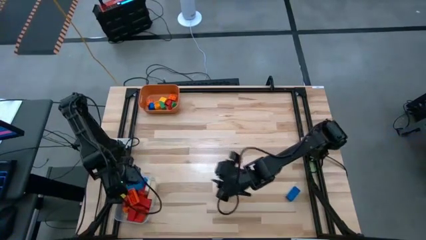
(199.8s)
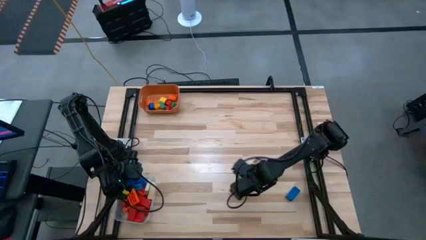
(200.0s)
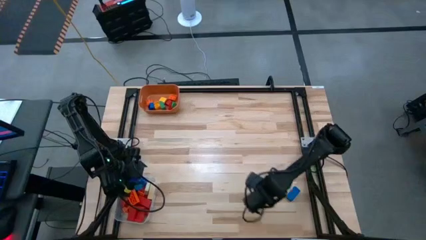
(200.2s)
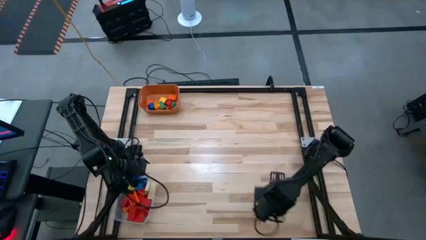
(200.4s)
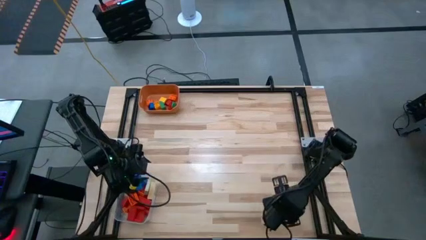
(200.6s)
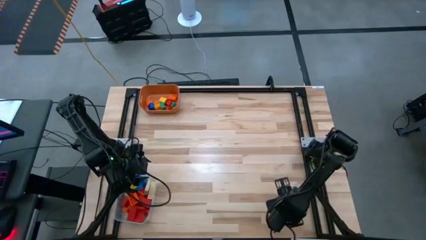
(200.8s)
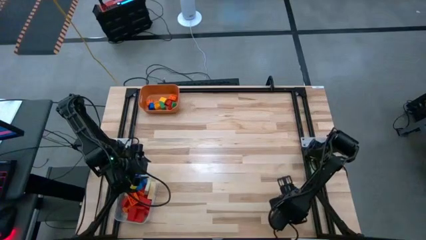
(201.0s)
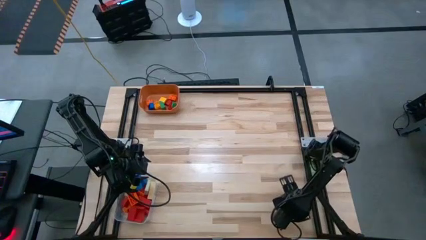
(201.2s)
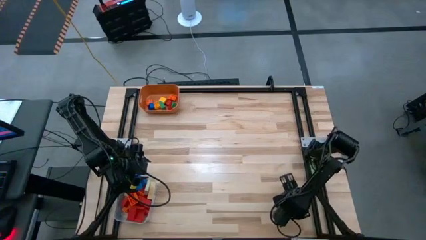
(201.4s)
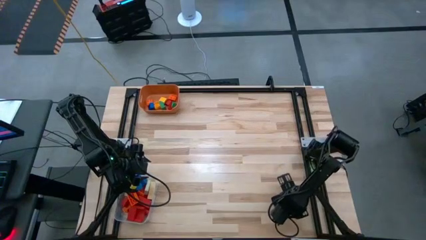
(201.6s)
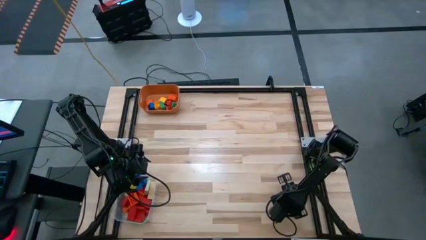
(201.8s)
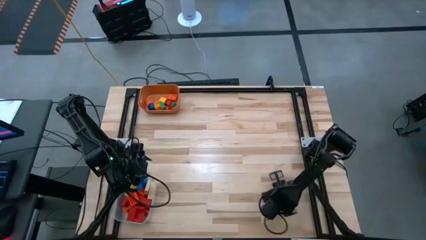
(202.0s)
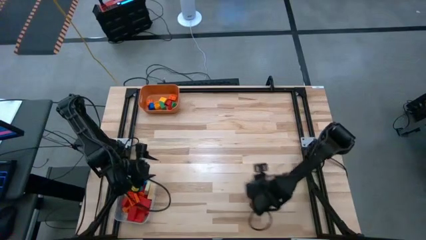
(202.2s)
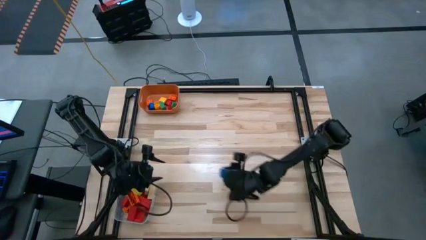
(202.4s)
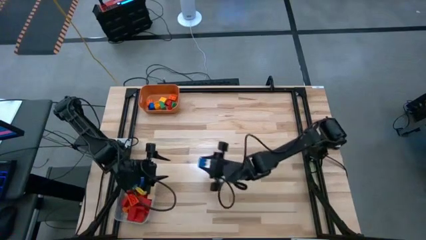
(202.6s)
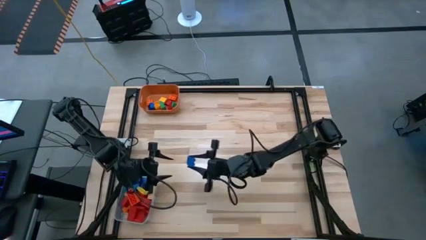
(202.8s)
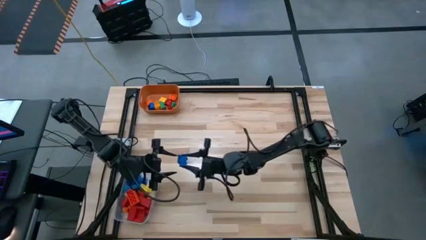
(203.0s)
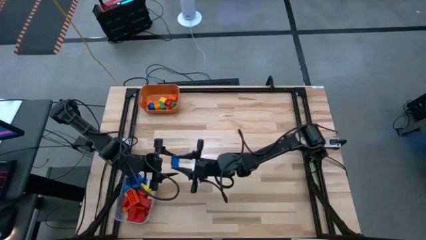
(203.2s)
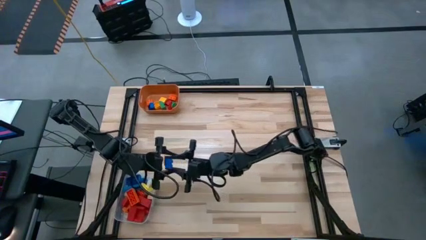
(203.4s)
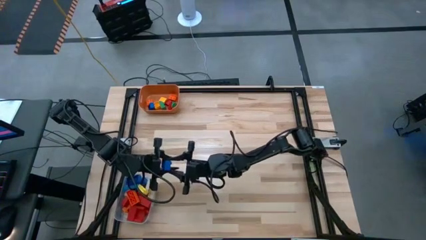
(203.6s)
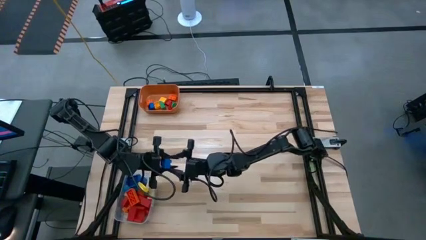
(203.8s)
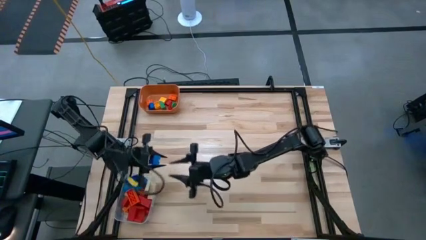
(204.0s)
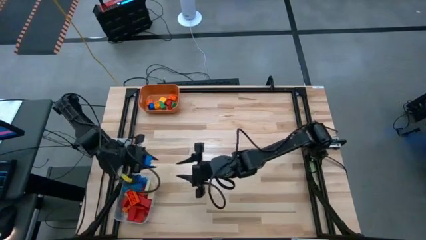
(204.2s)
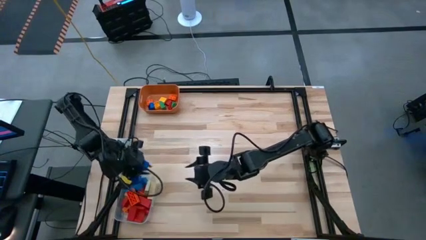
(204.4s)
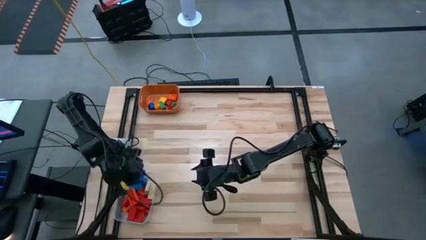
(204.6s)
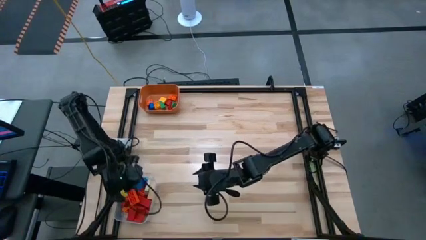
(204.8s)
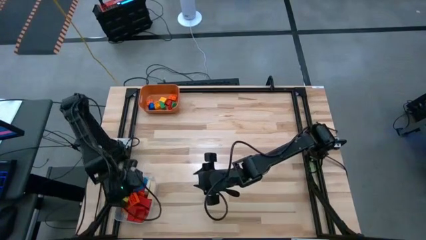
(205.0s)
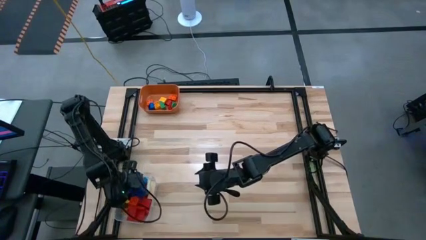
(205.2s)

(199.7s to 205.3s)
Task: Sort blocks by size
Put the large blue game piece into the transparent bin

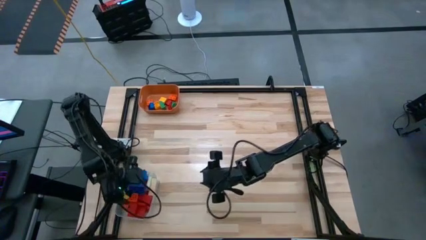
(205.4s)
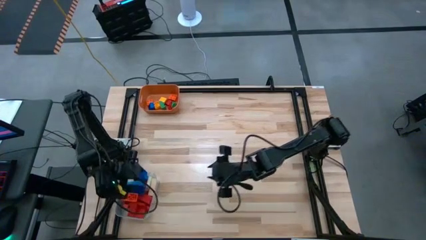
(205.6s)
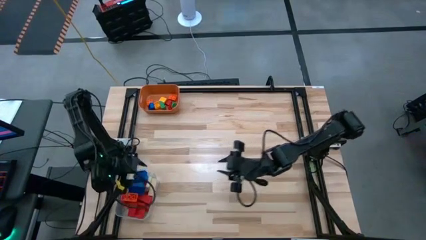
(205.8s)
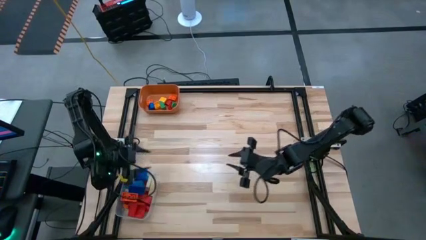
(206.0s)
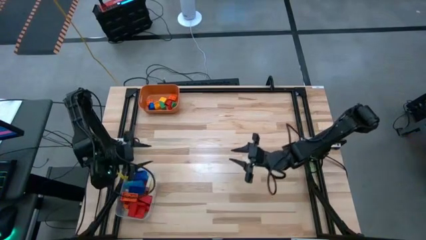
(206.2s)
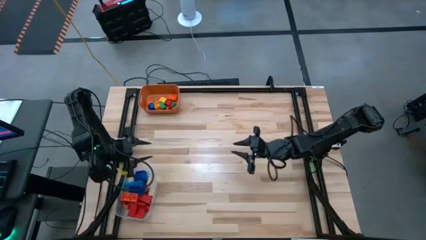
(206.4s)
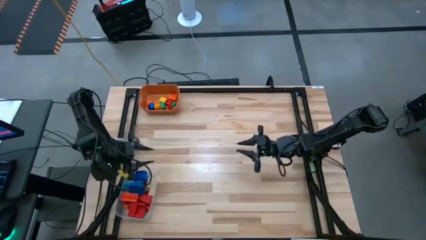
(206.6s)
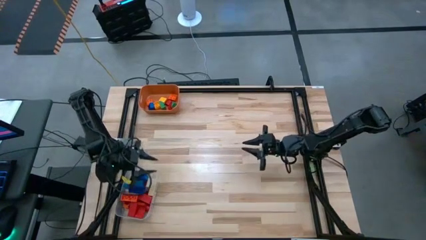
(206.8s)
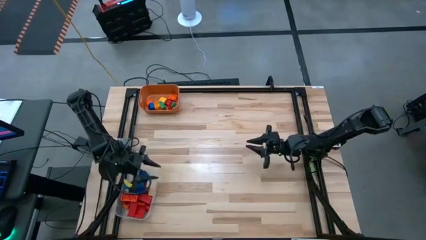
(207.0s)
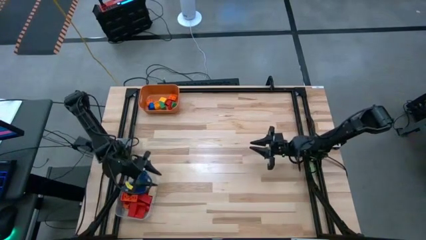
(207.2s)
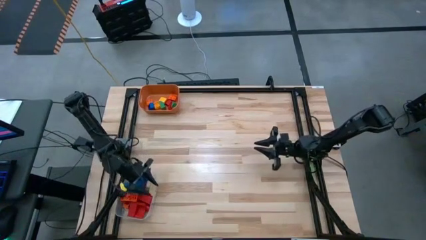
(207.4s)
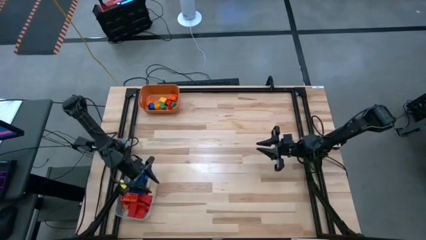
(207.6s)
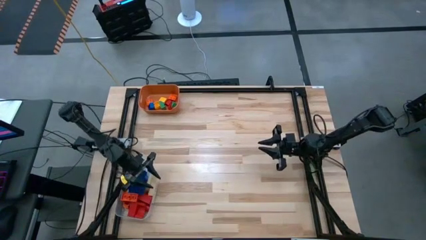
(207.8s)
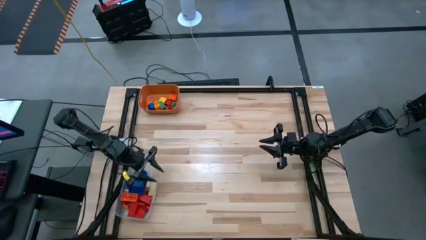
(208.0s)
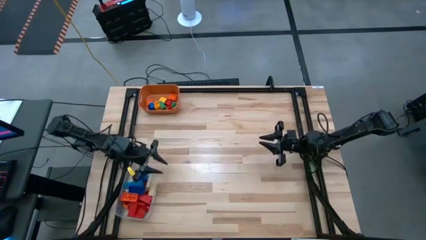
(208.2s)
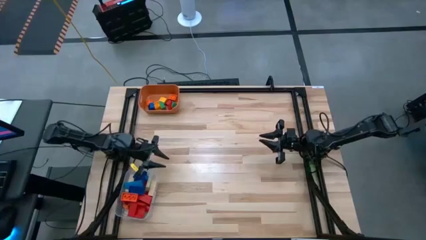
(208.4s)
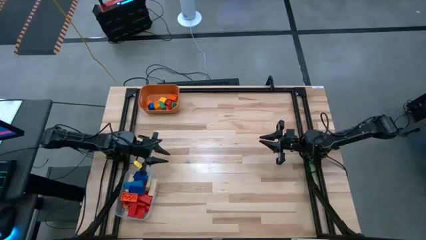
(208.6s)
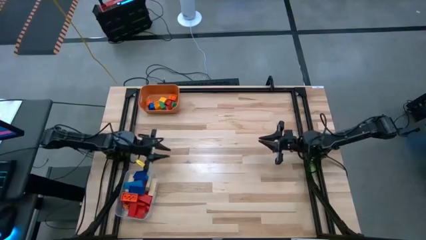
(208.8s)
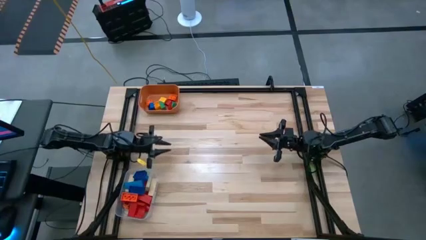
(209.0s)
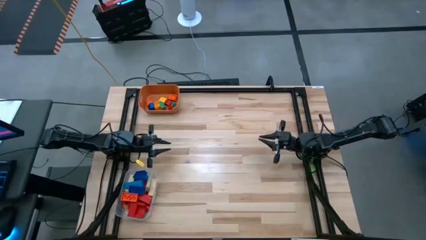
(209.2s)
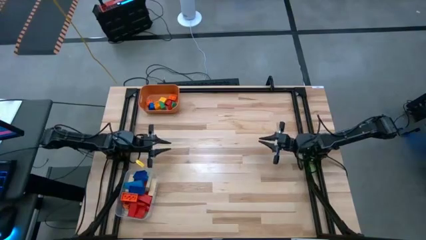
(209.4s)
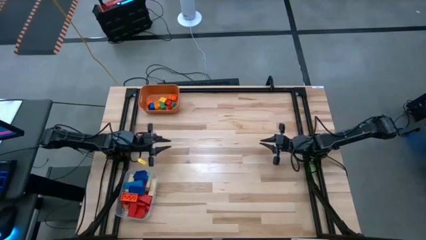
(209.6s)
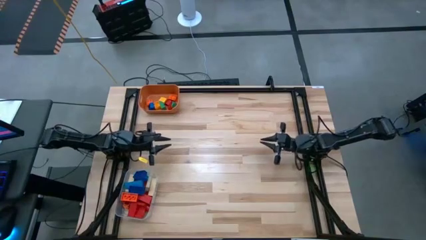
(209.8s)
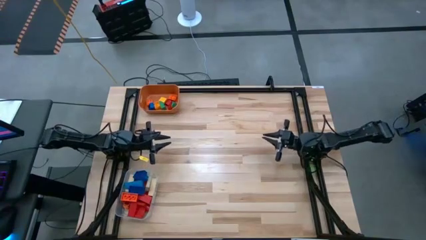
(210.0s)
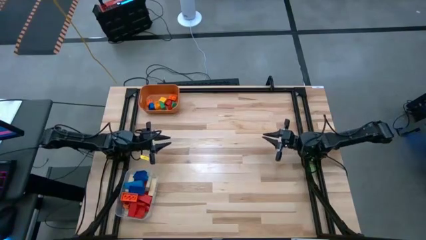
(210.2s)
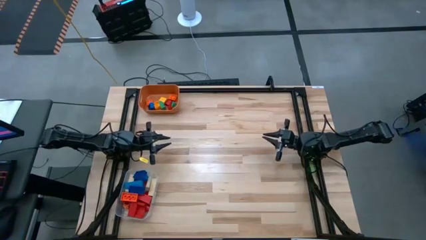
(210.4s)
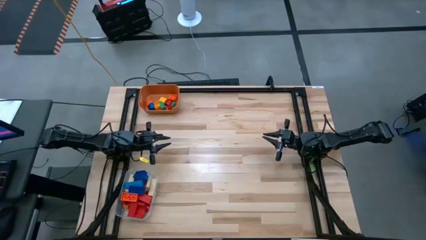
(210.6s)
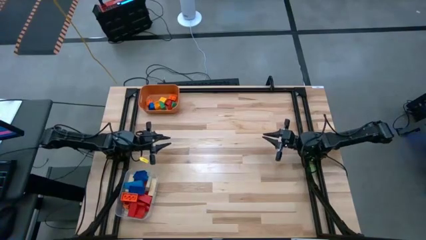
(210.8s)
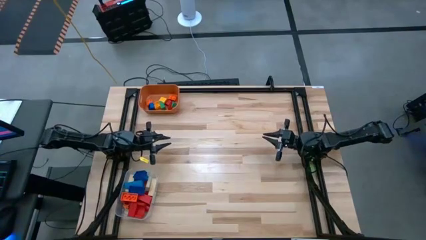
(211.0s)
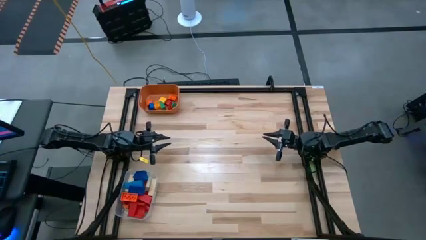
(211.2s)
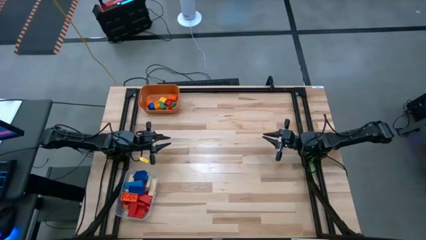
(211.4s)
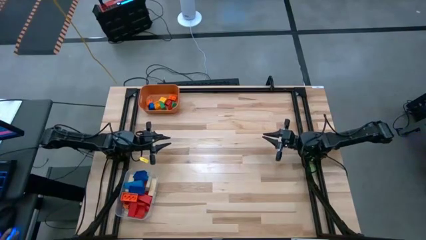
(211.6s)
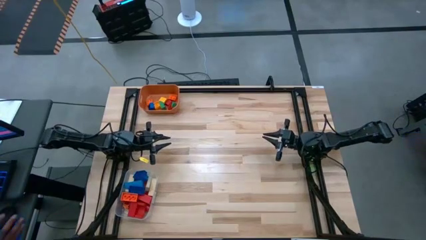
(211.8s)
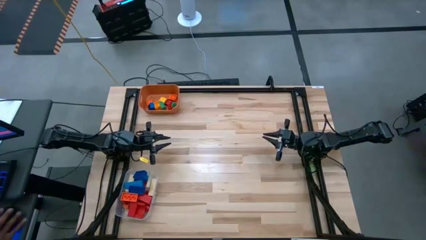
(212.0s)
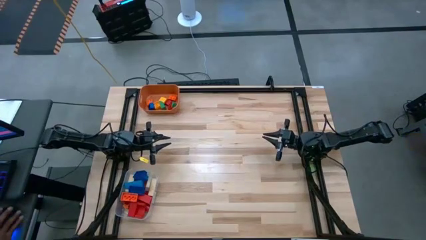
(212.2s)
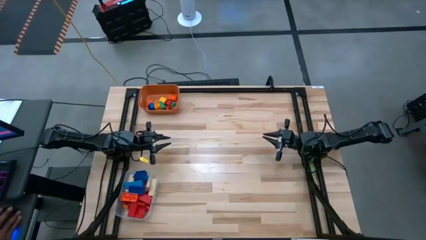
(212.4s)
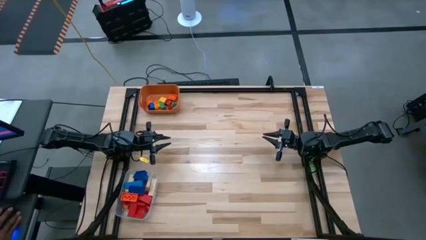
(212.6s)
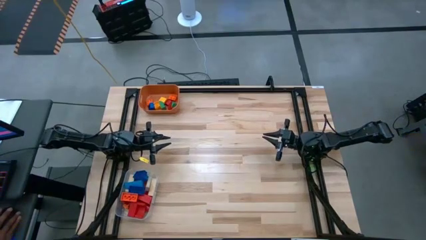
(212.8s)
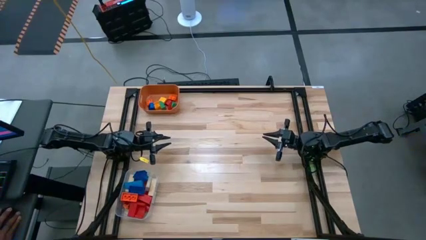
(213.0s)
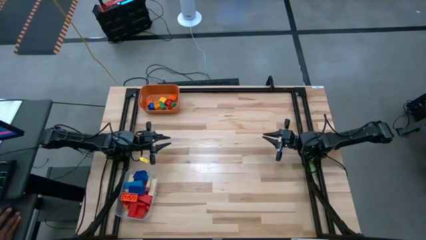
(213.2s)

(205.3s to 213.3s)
Return to Home Position

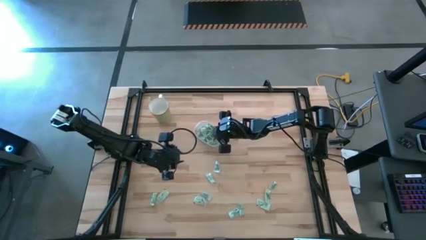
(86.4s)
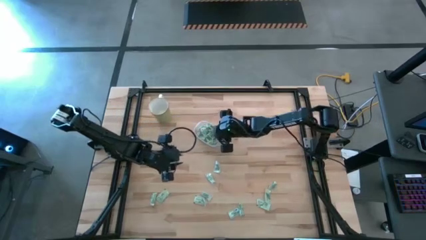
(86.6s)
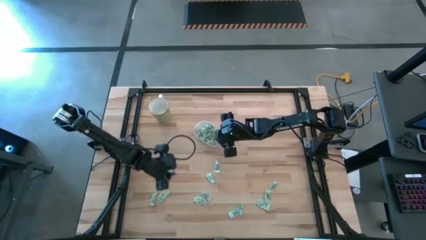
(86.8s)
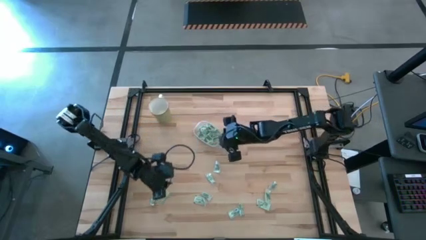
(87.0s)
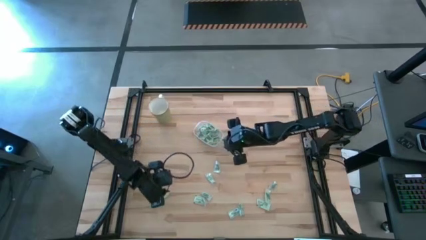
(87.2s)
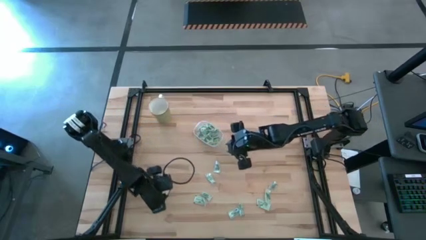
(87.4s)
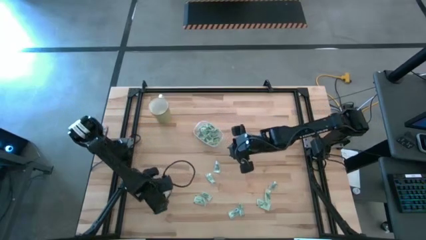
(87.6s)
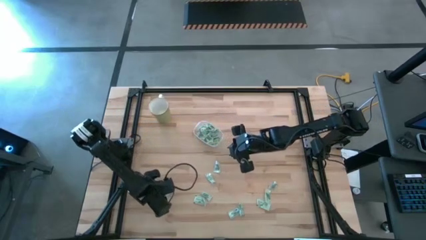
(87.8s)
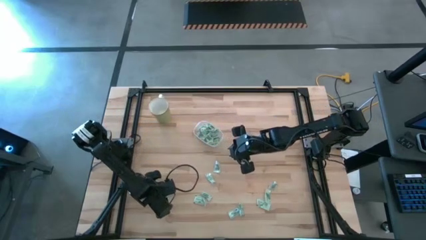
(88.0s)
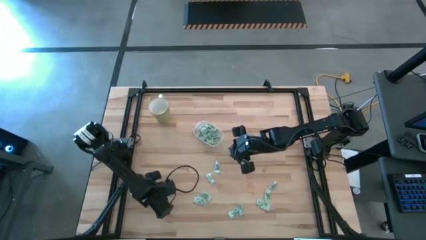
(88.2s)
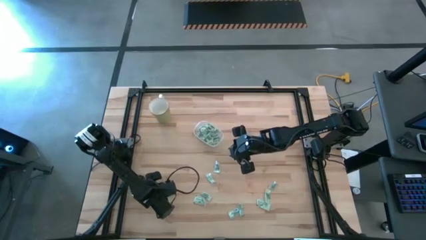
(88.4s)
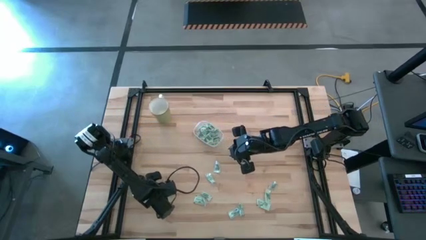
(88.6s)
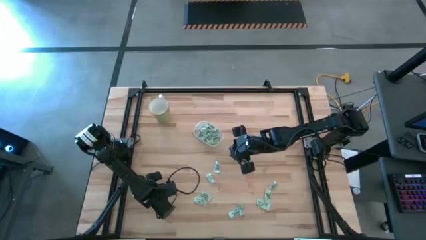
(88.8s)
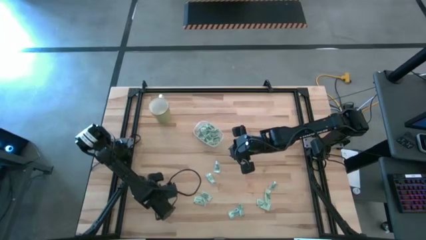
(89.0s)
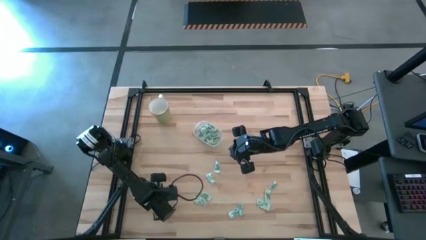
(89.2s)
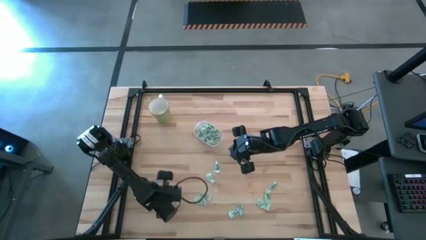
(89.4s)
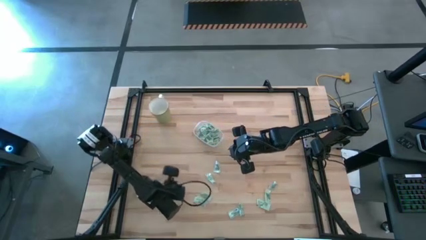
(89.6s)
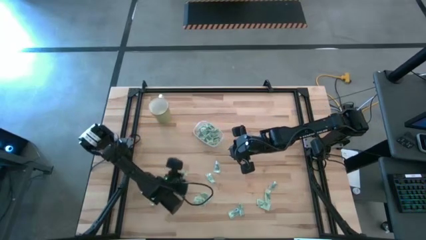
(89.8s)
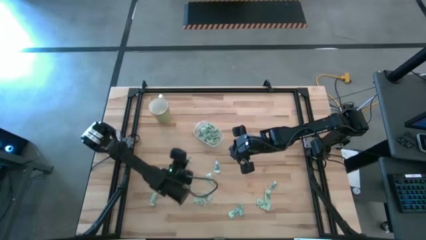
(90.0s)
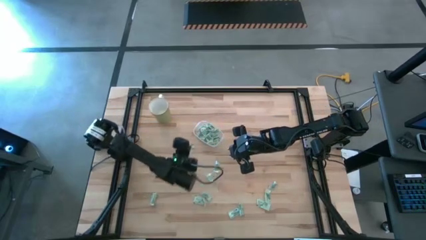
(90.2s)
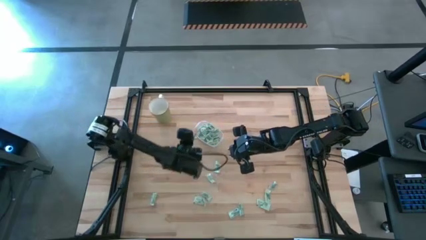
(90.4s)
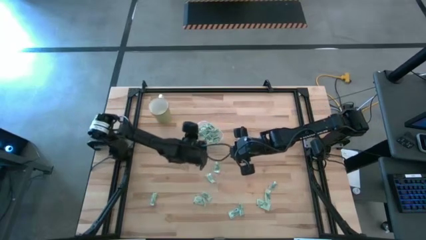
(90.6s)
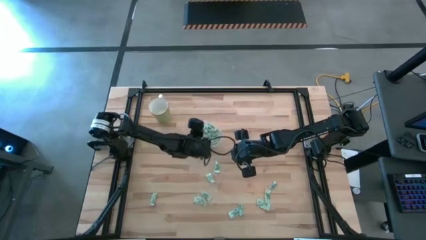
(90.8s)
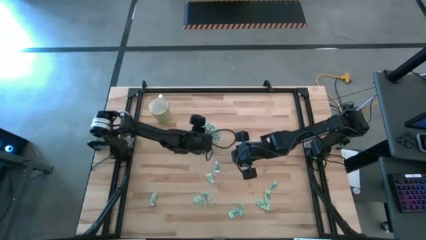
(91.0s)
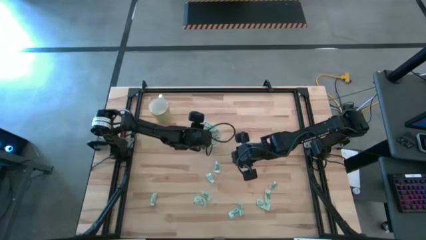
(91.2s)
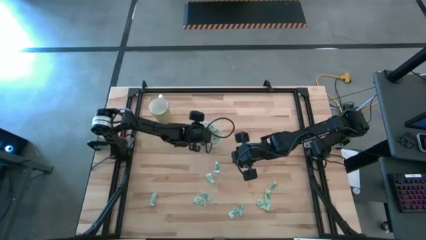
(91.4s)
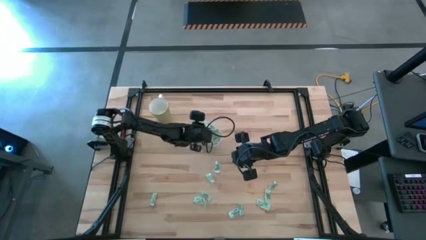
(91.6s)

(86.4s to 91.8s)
Task: Pick and place Stevia / Truvia into bins
Put the stevia packet into the transparent container
